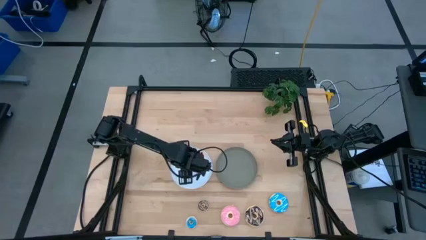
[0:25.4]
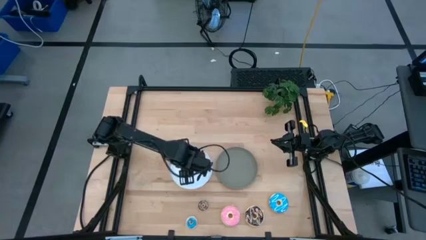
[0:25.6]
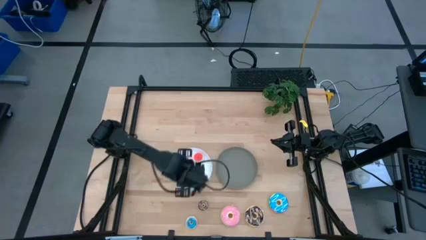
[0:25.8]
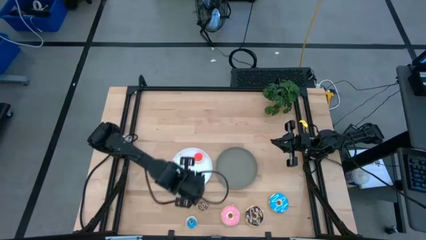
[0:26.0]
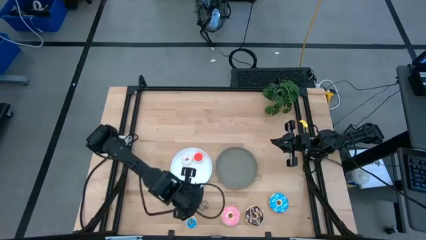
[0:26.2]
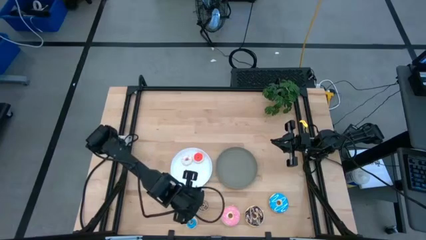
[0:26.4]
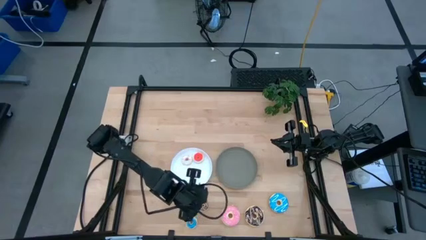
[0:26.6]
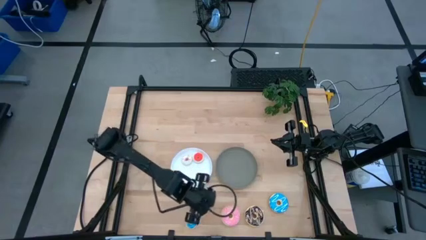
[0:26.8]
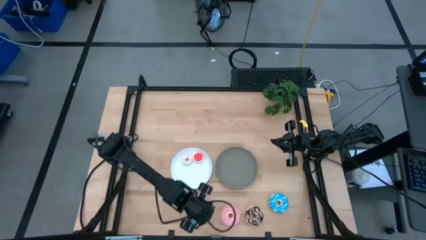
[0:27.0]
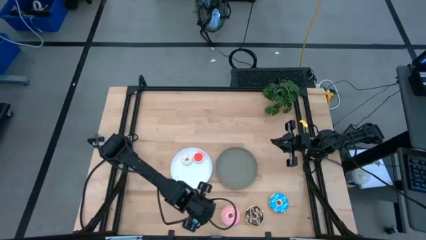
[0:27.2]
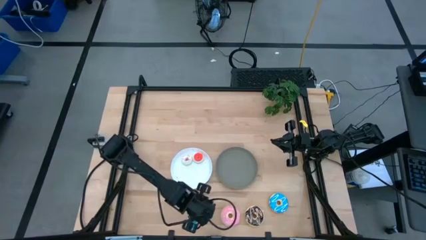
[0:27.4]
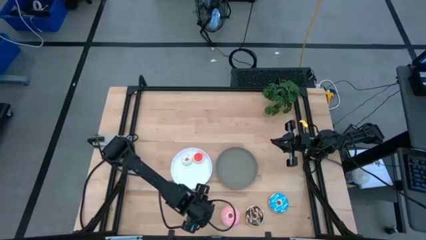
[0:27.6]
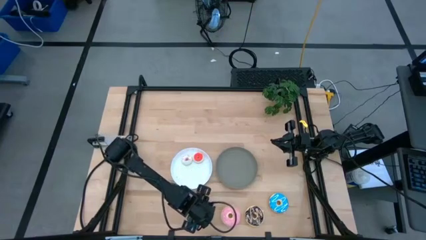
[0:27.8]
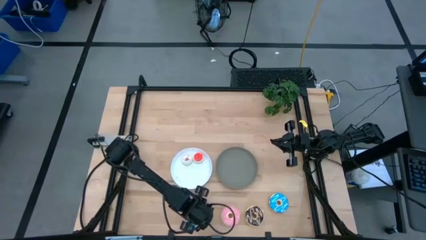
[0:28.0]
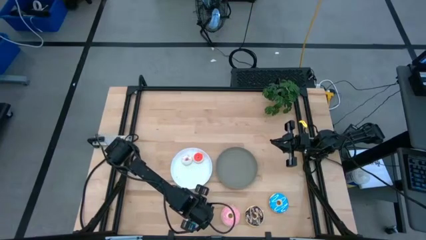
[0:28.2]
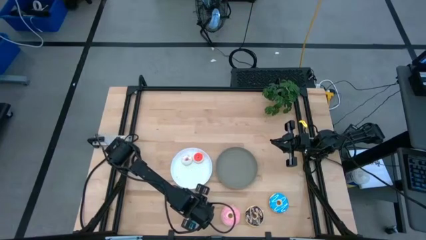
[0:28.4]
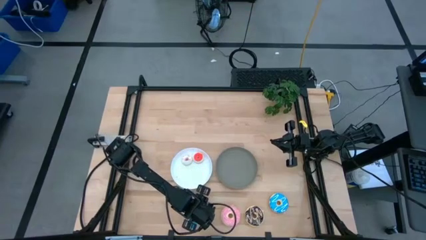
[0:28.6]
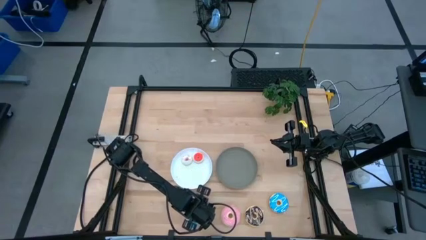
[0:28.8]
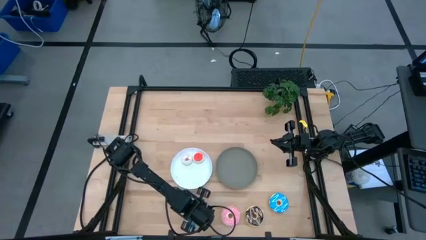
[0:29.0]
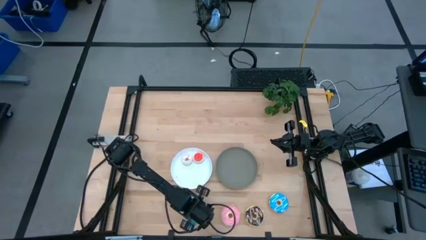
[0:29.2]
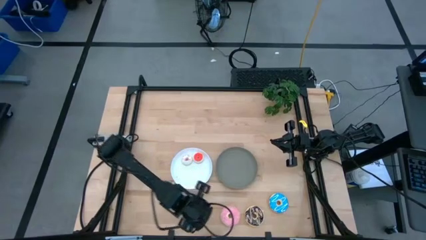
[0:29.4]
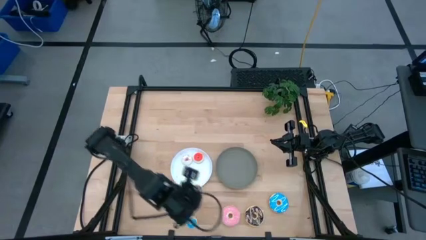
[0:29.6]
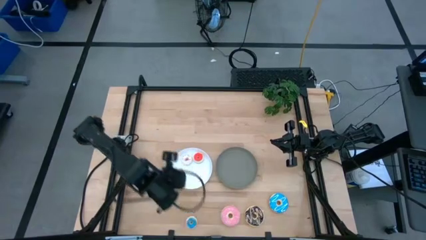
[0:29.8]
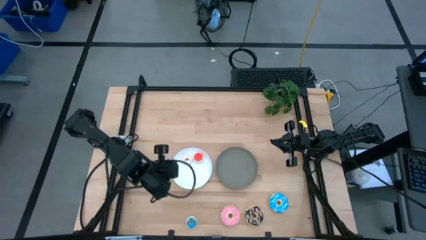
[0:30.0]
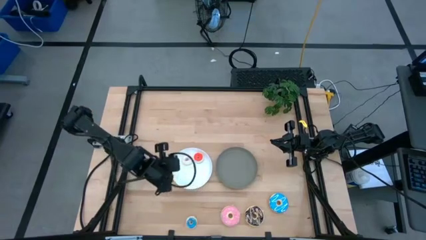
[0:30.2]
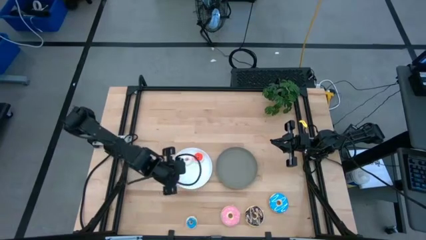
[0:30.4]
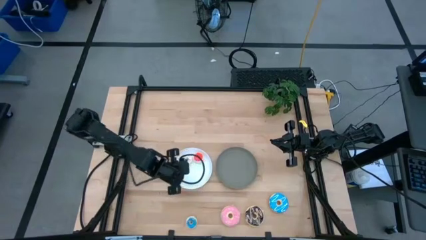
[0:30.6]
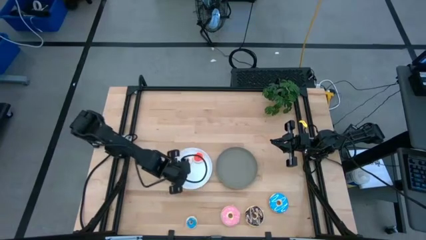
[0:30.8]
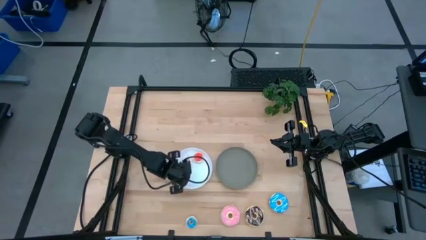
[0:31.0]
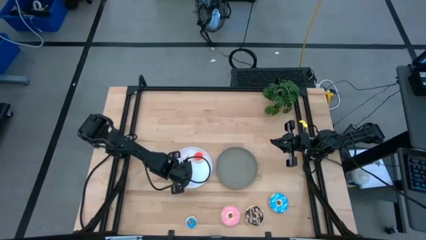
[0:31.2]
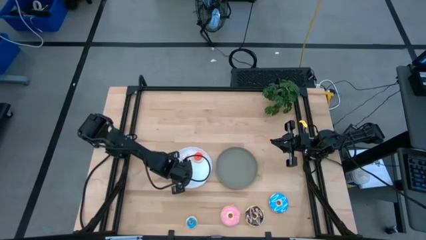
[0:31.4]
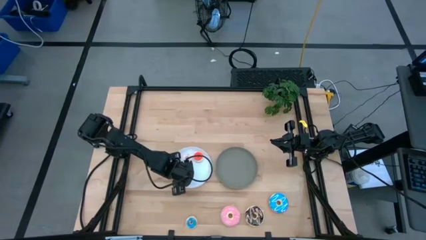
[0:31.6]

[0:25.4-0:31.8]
Task: Pick & Place donuts
Put the small brown donut on the white plate

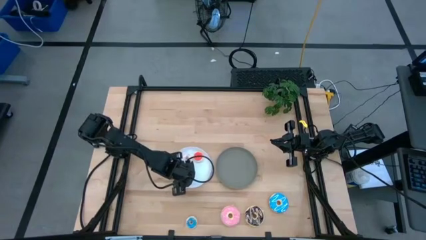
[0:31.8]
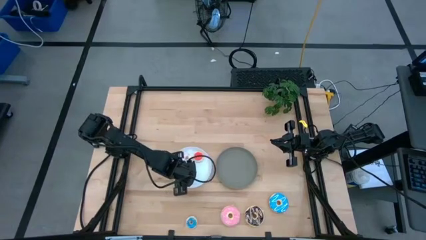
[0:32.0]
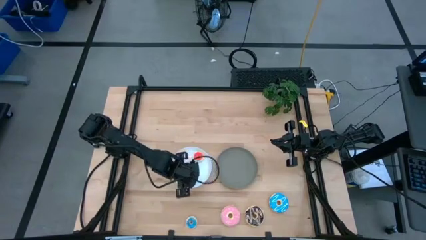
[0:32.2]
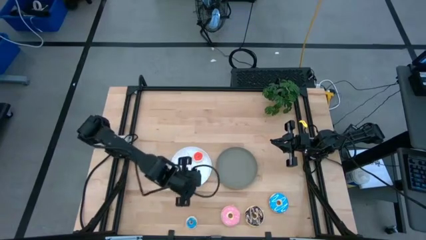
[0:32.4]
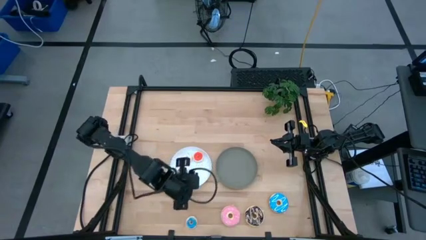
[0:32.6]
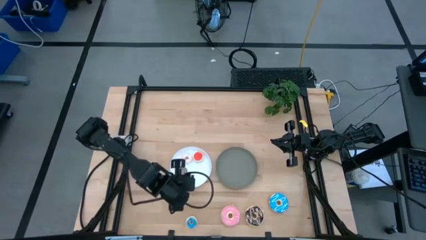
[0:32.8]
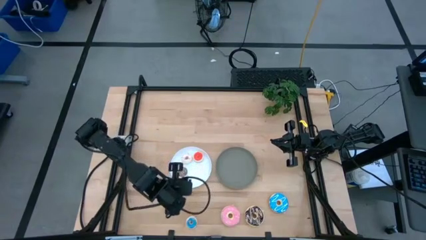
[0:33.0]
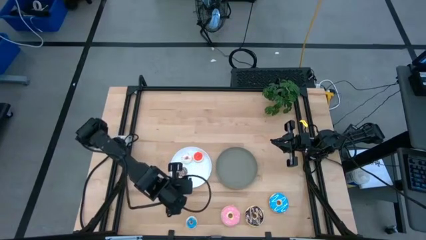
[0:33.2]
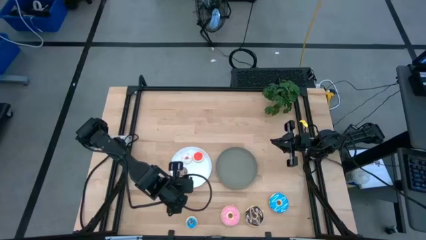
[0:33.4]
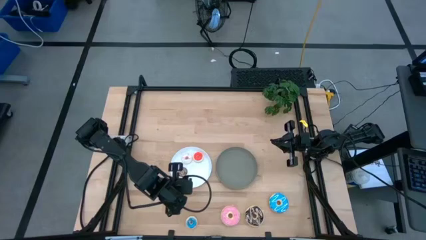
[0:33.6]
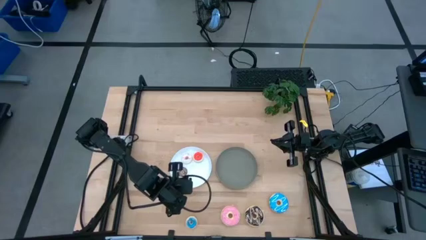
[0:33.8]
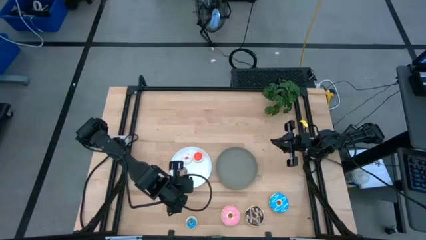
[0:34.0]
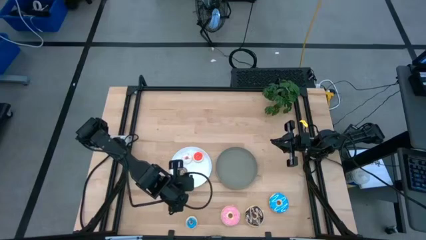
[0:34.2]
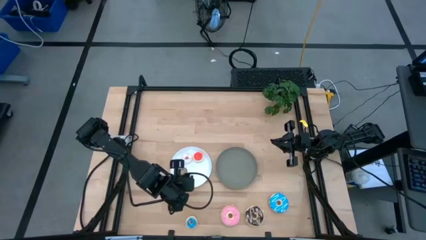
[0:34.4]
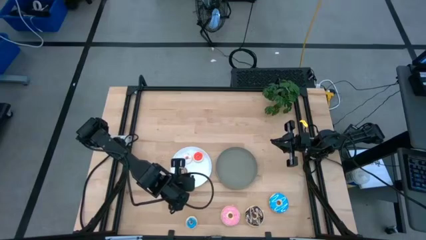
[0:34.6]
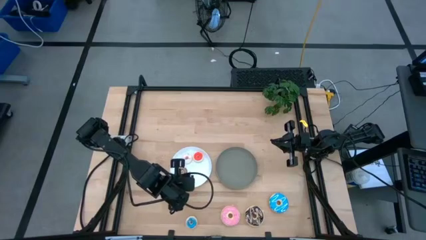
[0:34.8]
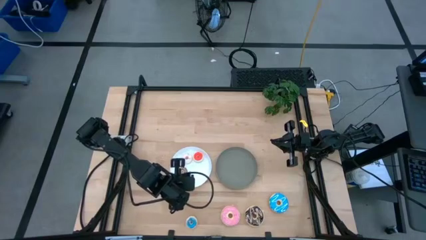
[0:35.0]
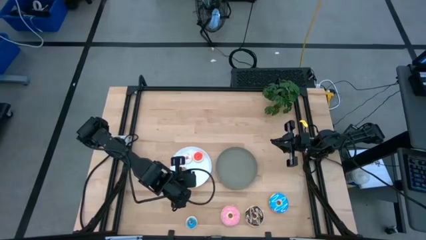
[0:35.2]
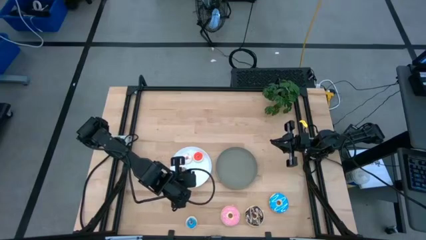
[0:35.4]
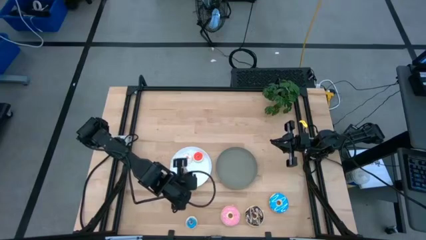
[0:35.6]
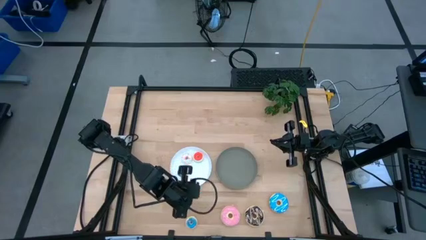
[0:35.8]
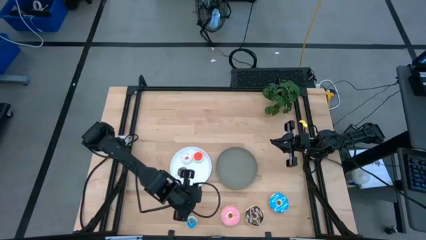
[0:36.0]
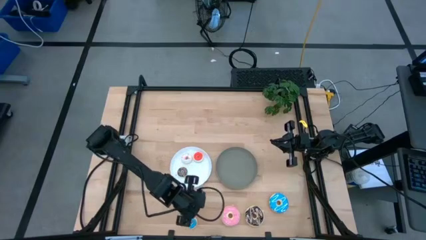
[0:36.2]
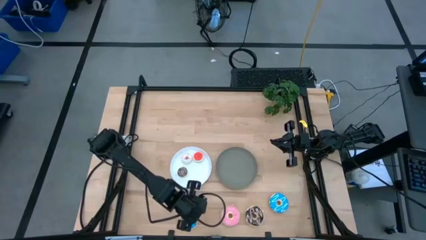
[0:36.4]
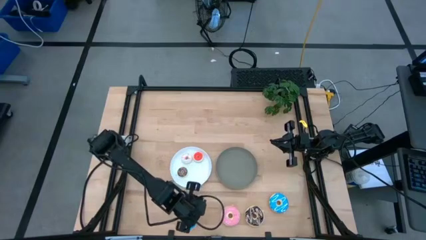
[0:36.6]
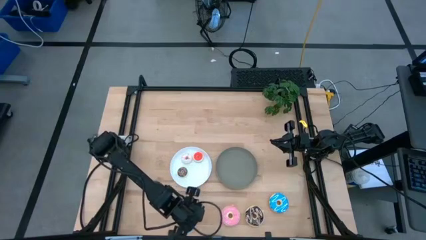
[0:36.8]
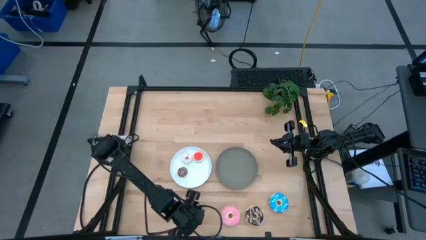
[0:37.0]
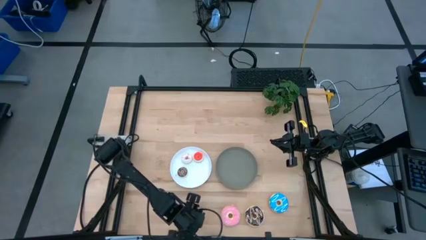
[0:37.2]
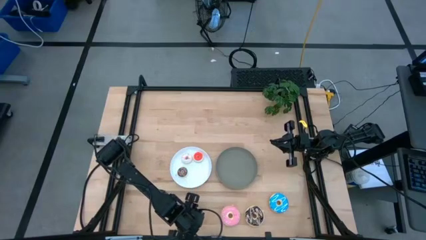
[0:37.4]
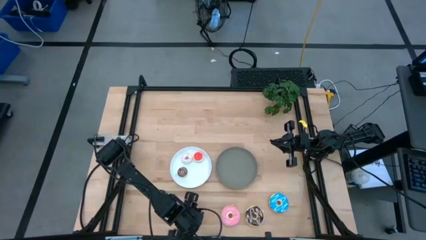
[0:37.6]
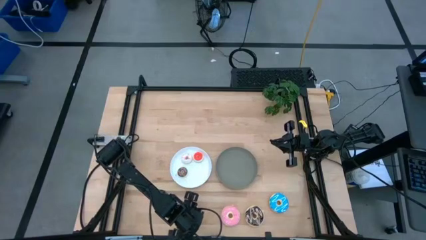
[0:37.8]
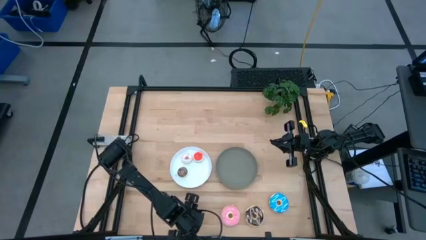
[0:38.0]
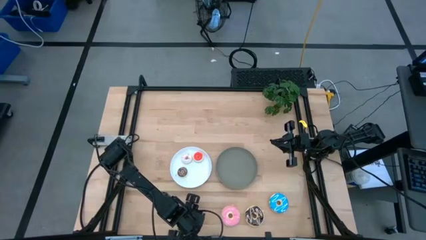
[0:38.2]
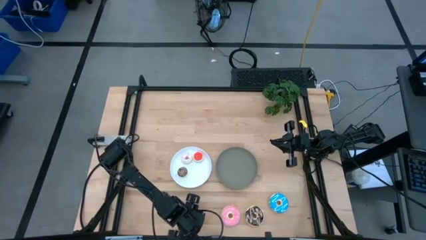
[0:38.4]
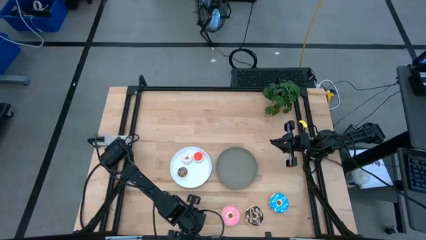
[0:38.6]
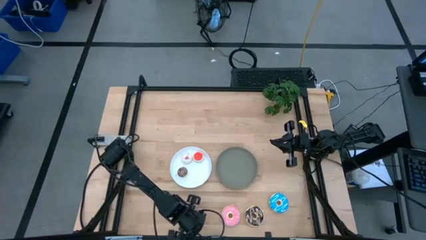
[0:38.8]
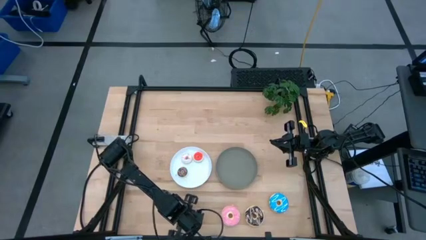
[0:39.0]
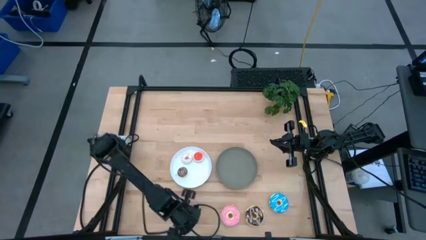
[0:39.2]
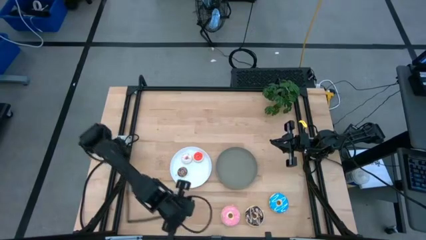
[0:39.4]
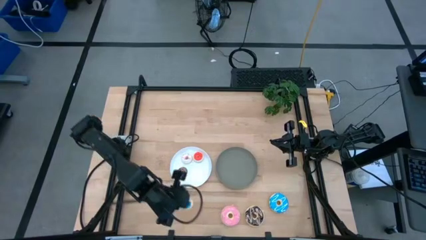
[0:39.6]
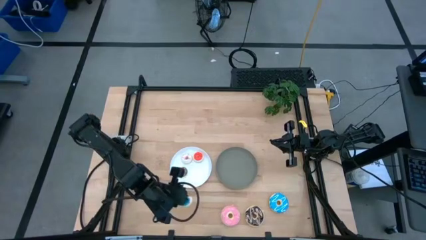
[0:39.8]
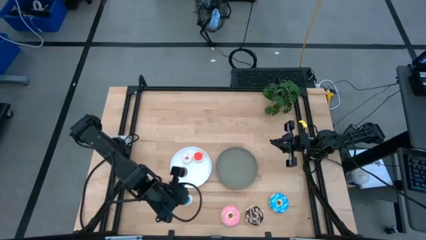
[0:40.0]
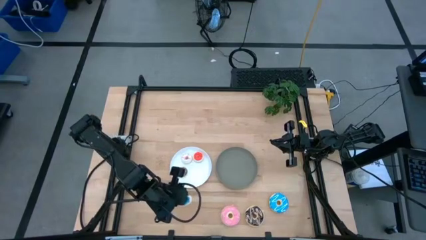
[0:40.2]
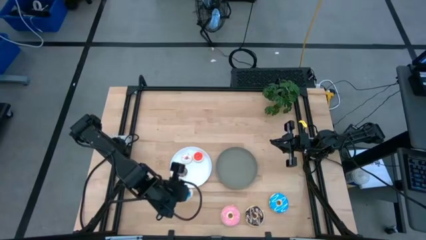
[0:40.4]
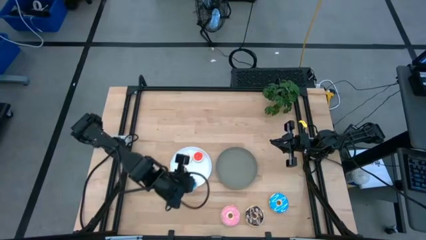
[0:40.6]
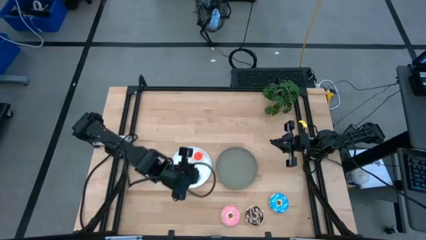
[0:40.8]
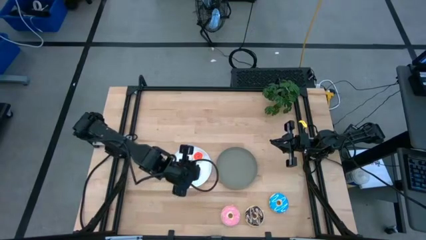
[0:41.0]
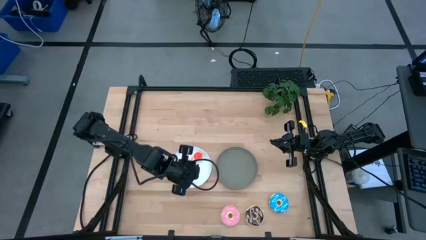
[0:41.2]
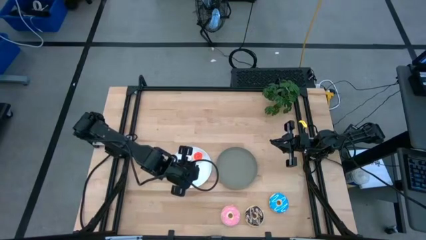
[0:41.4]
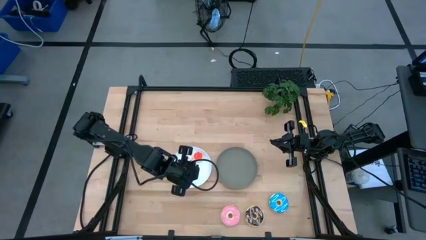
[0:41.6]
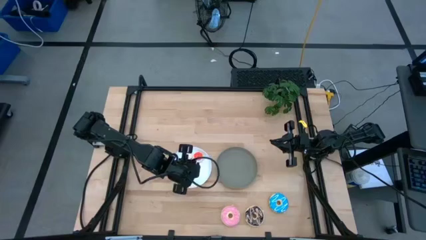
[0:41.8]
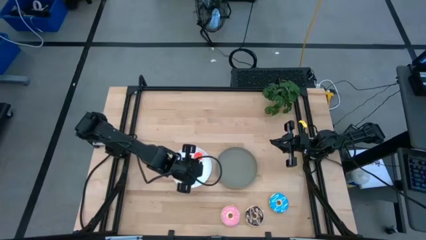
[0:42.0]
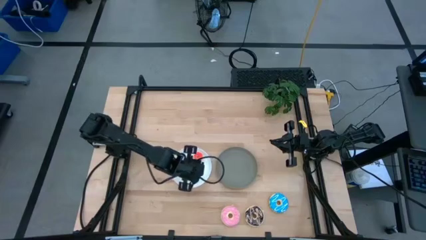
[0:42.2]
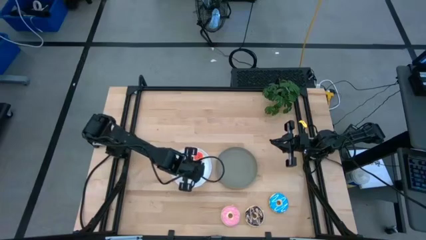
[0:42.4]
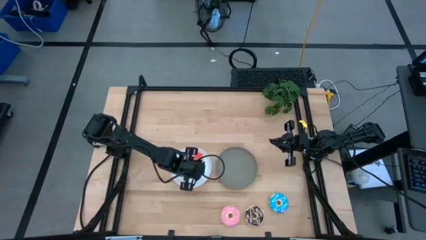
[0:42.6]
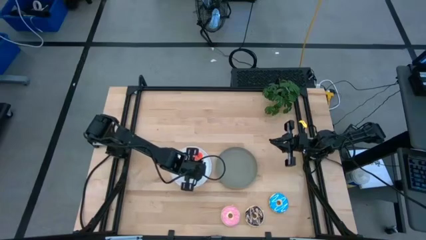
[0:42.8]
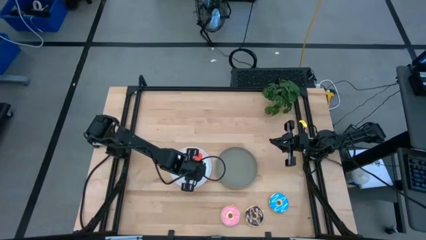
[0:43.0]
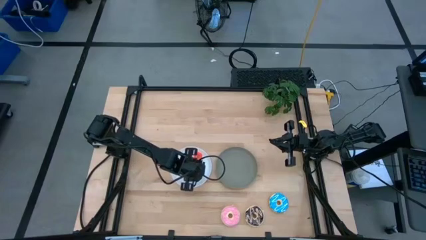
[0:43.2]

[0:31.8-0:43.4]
Put the small blue donut on the white plate
